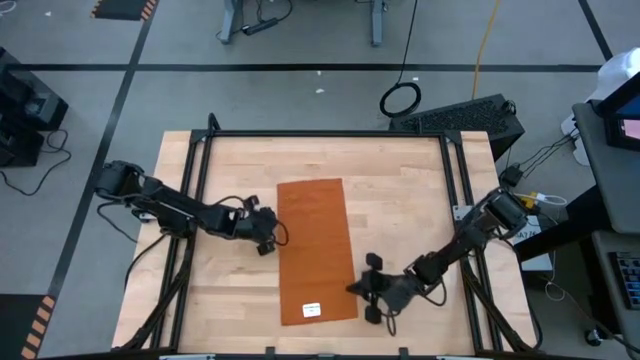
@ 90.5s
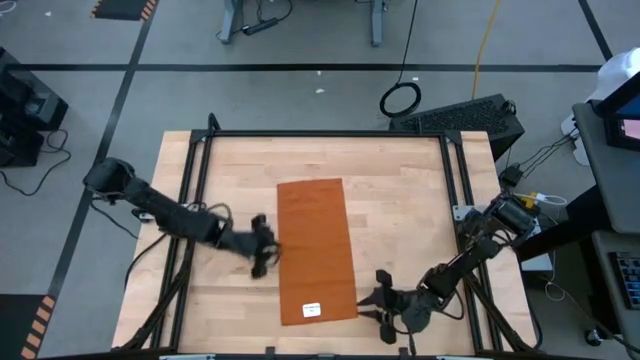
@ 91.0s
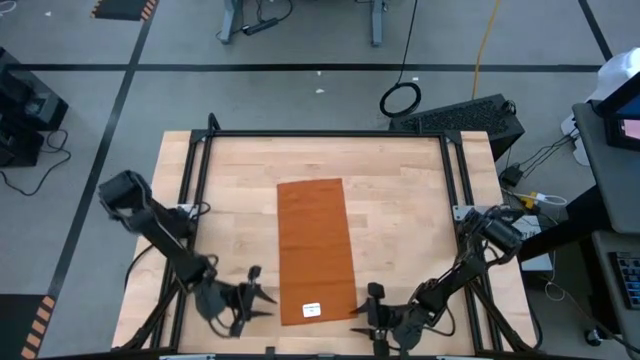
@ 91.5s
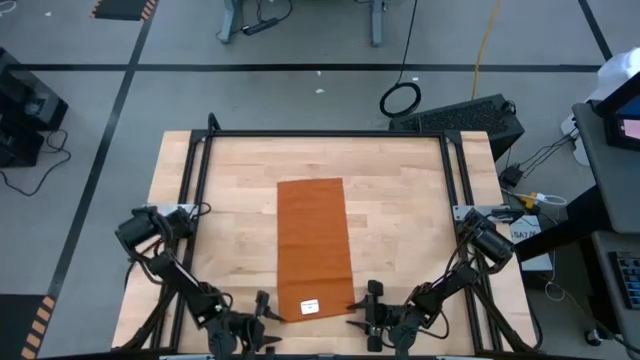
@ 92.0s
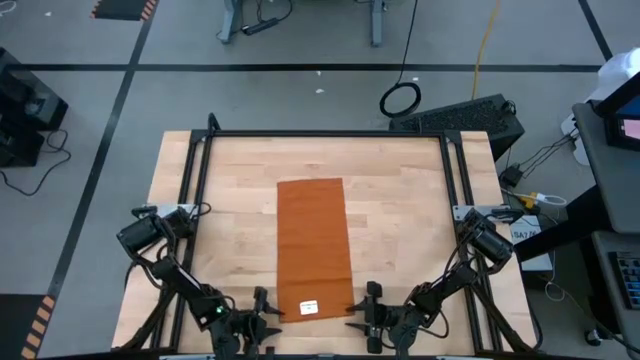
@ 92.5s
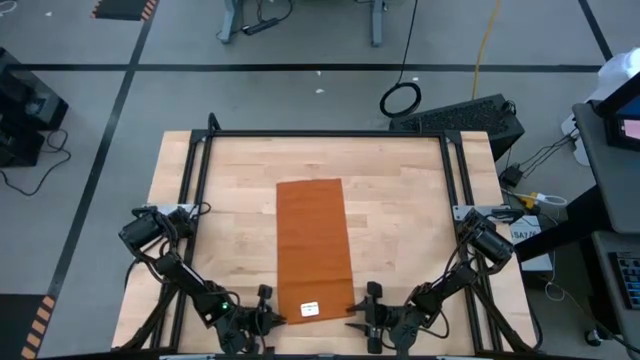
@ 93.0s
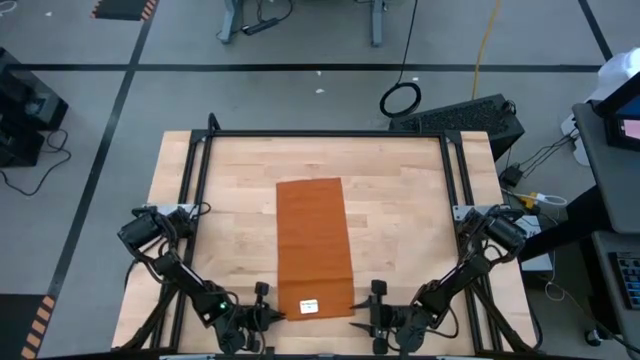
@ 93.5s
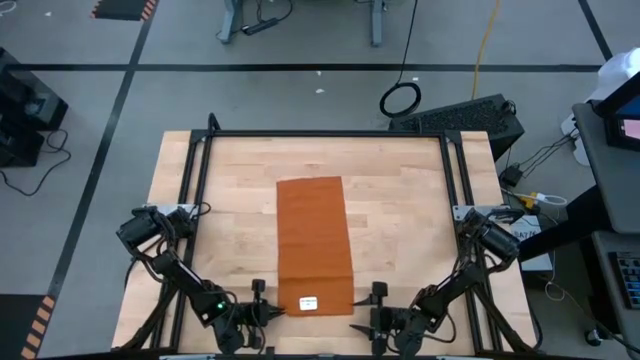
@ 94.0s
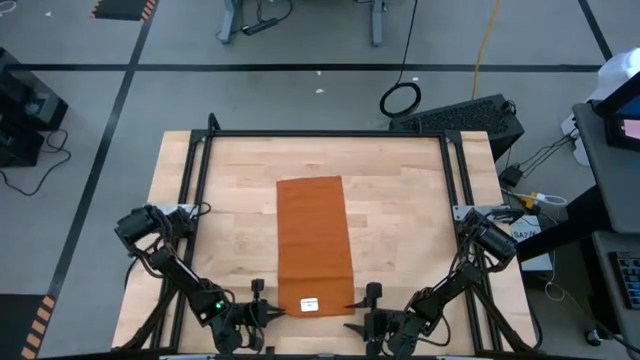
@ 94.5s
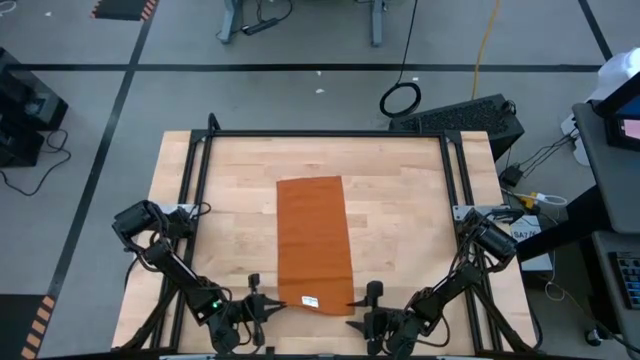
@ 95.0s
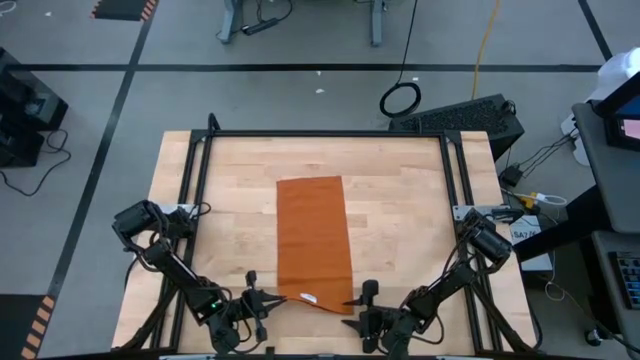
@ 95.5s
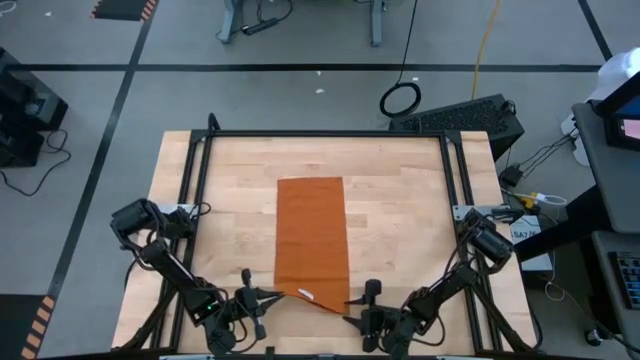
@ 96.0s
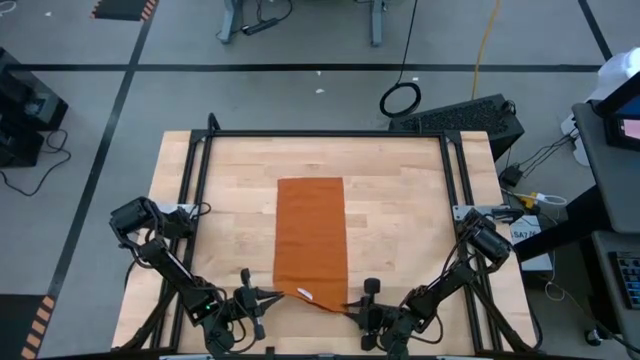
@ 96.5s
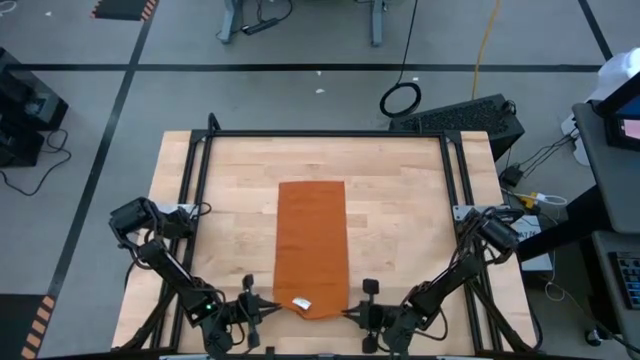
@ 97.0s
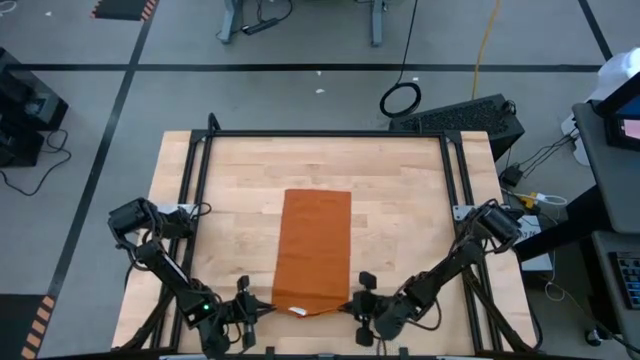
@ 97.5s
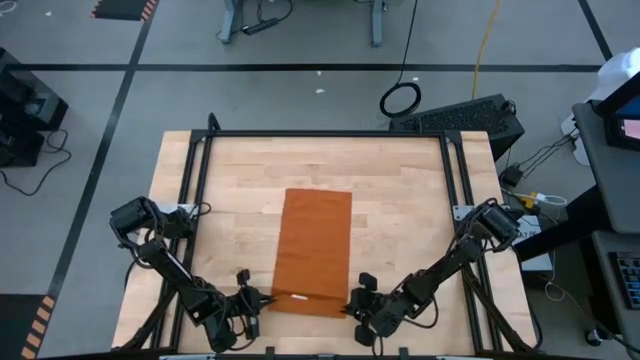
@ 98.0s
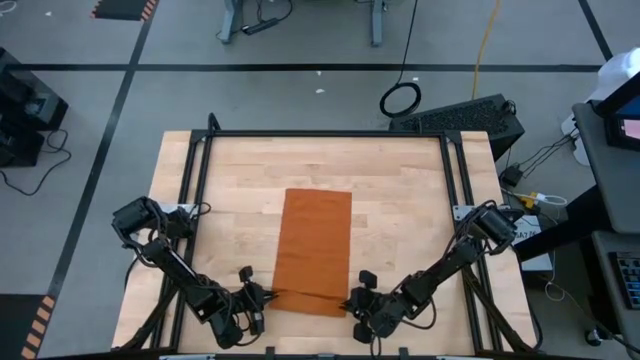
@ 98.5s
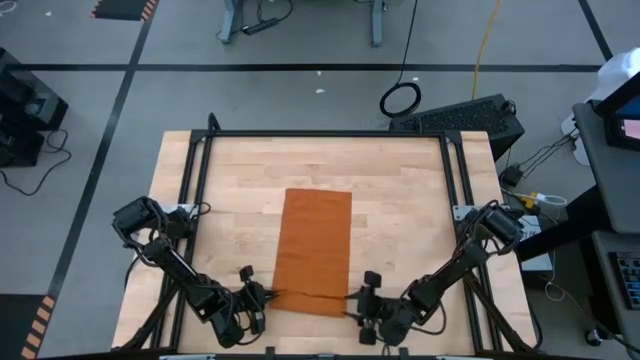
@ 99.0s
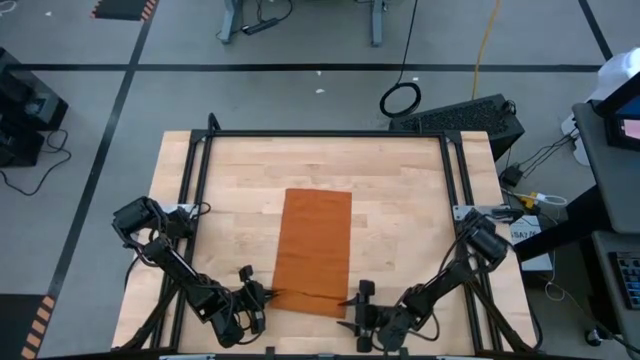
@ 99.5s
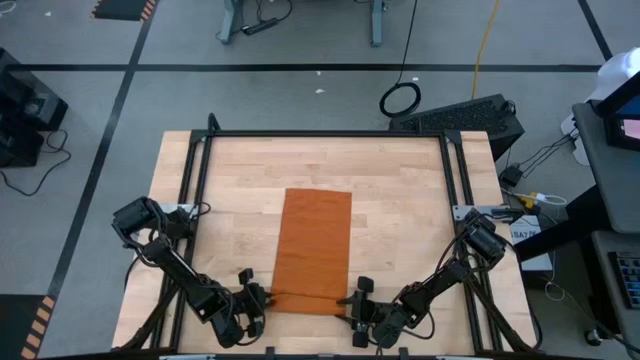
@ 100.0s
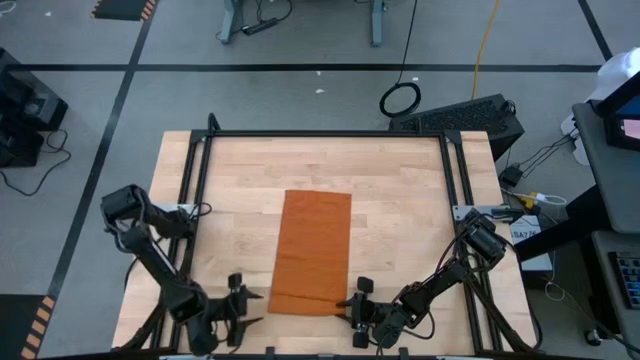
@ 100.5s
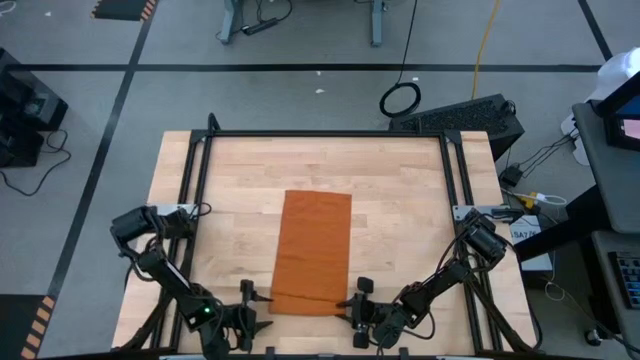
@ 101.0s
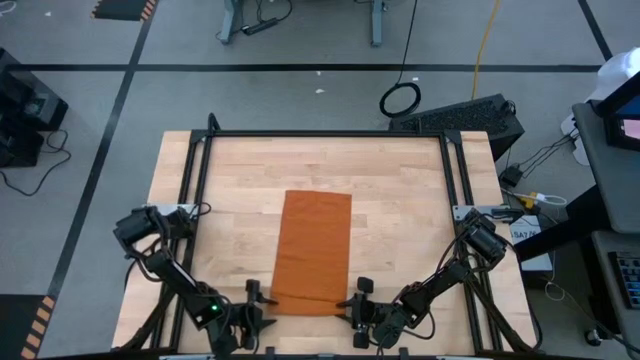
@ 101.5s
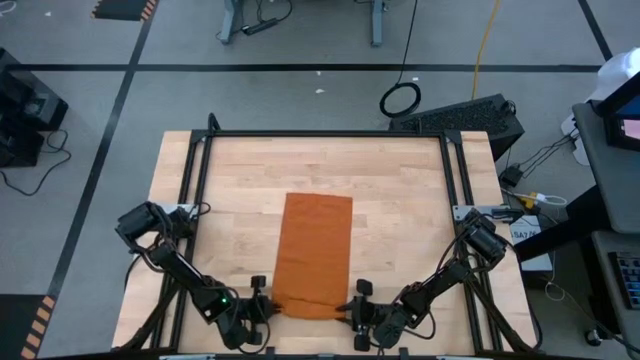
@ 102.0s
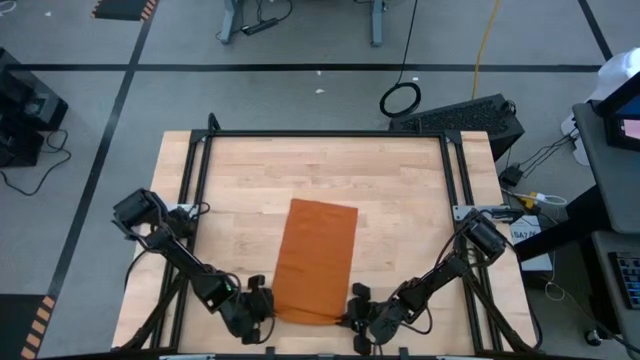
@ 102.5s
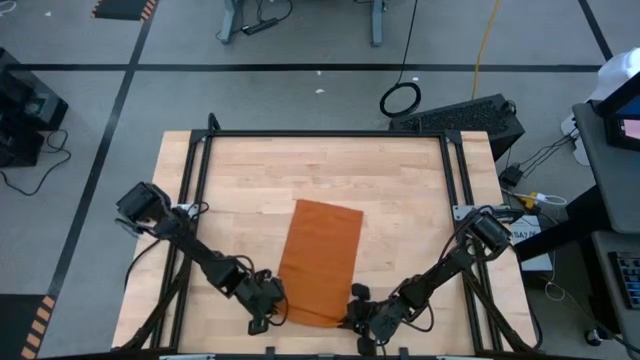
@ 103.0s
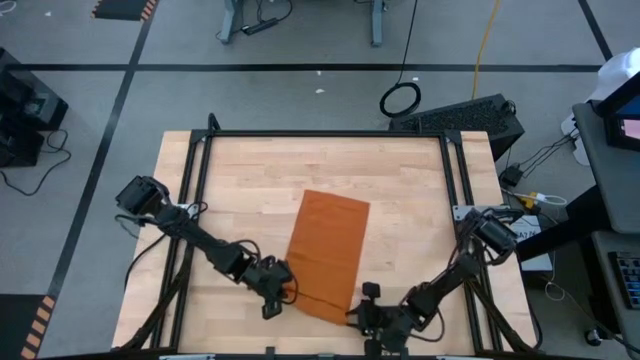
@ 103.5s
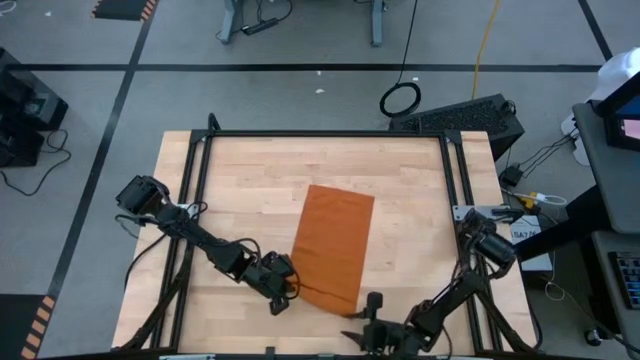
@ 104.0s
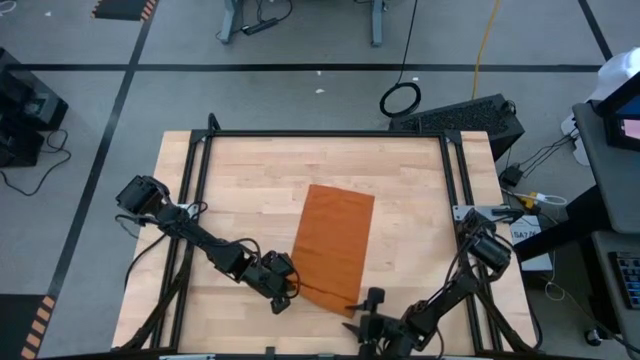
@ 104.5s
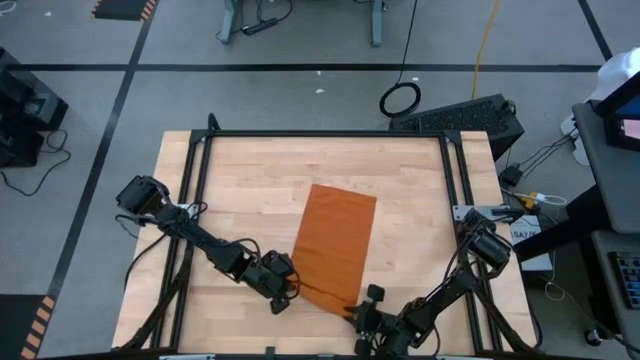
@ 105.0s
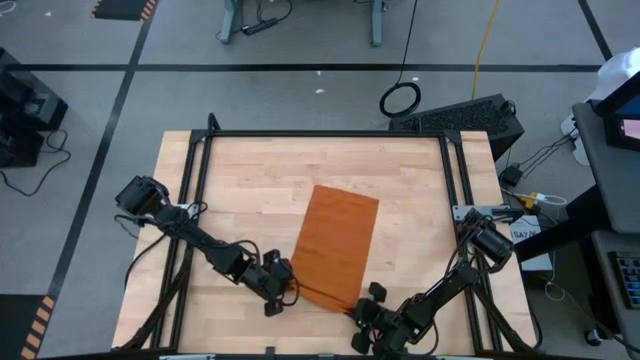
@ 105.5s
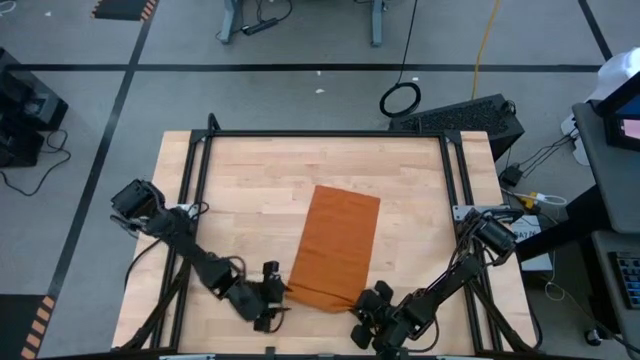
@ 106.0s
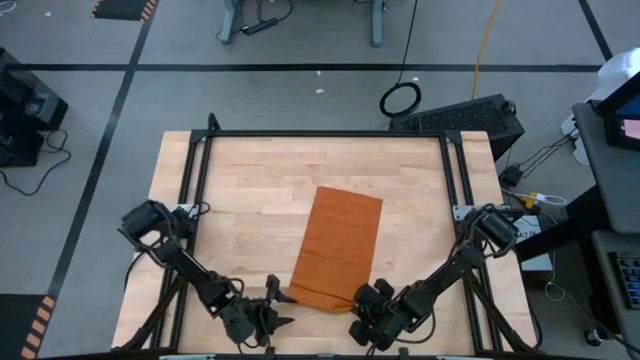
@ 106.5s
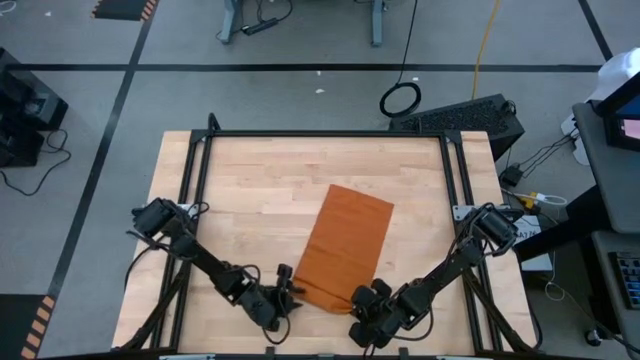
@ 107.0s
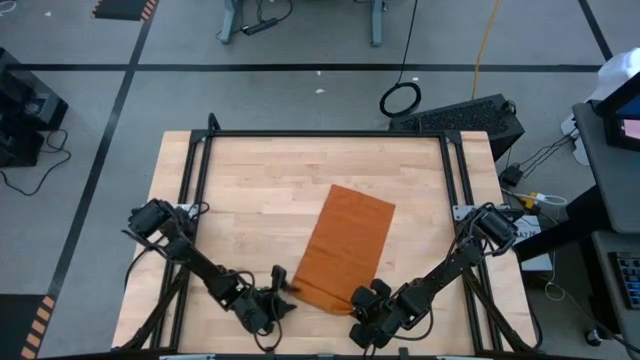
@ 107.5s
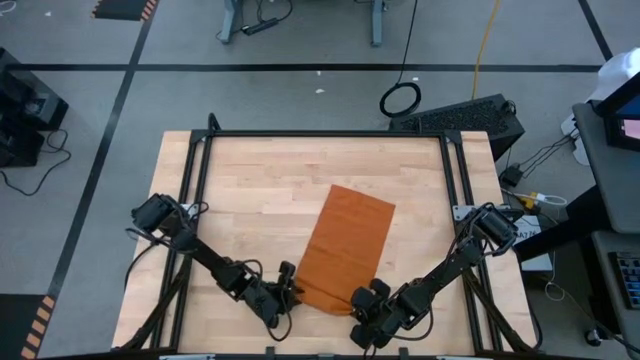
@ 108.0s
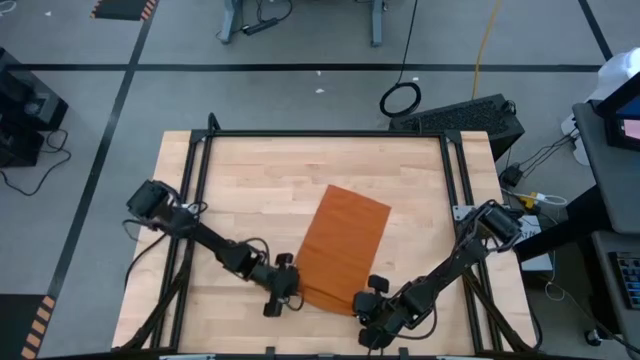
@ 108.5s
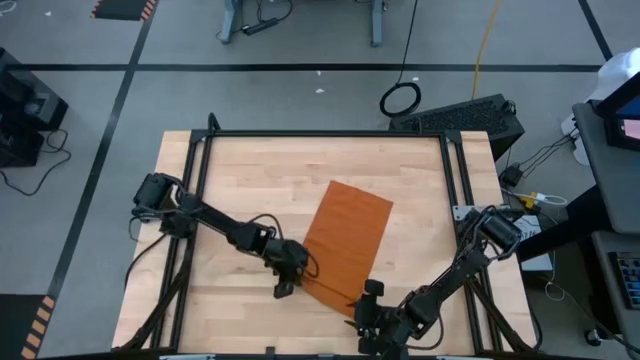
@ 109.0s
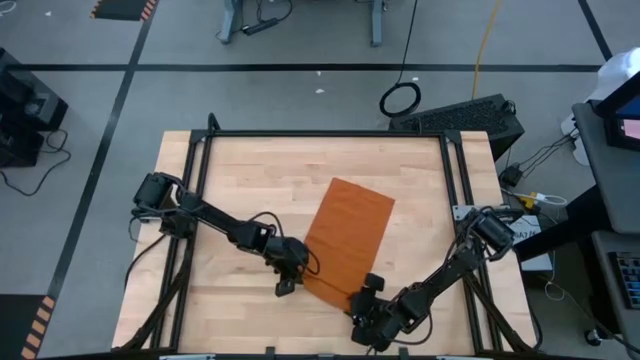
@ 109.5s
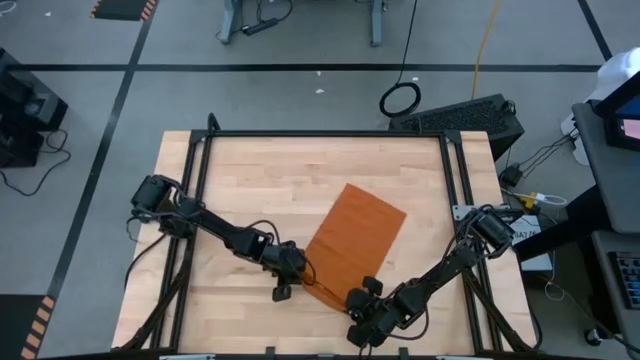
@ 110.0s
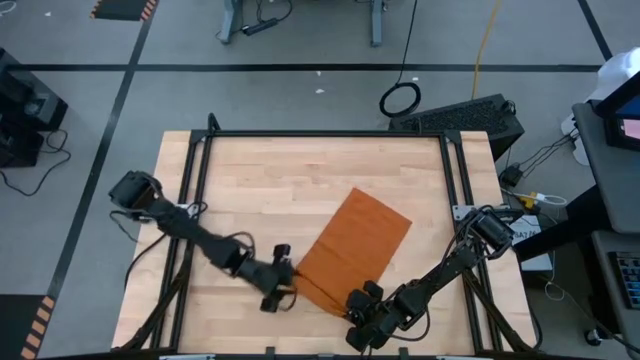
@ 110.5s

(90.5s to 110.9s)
Task: Roll towel into tight, uniform cylinder
Roll the brown towel

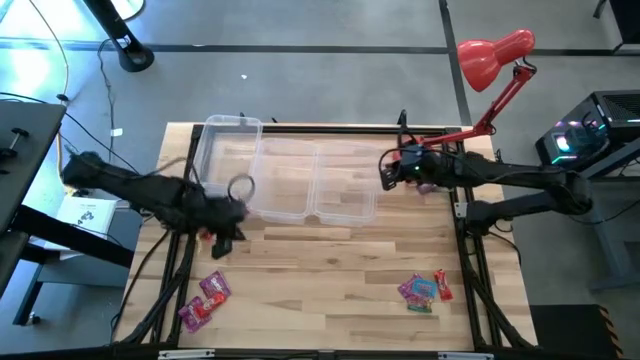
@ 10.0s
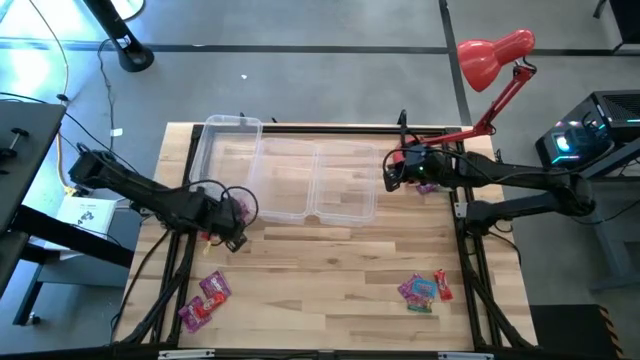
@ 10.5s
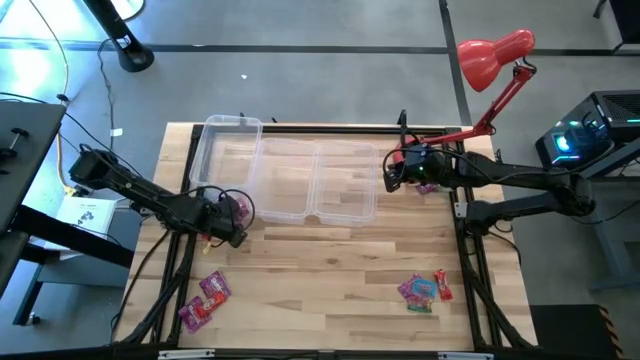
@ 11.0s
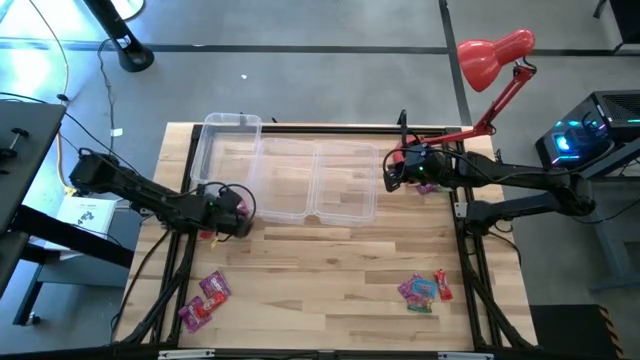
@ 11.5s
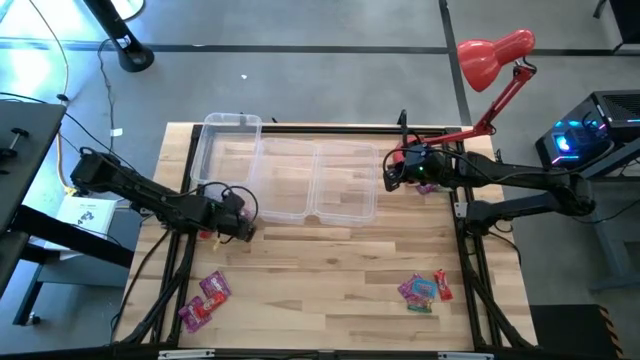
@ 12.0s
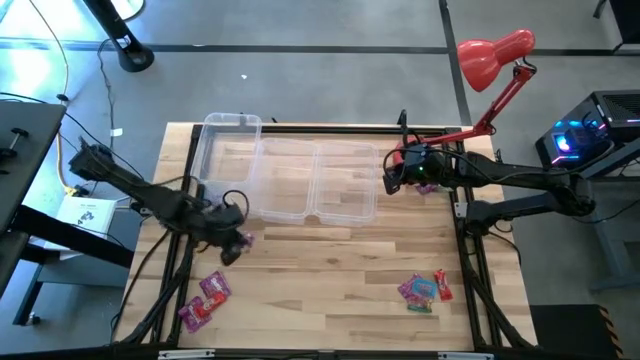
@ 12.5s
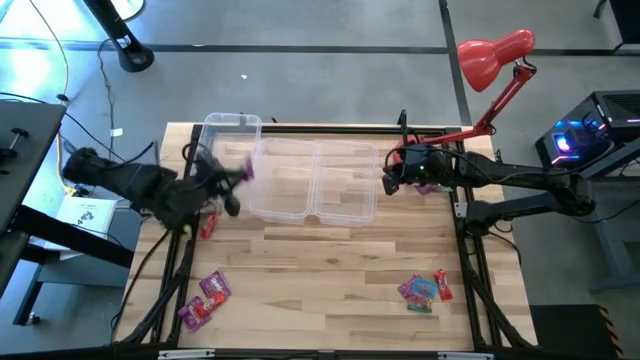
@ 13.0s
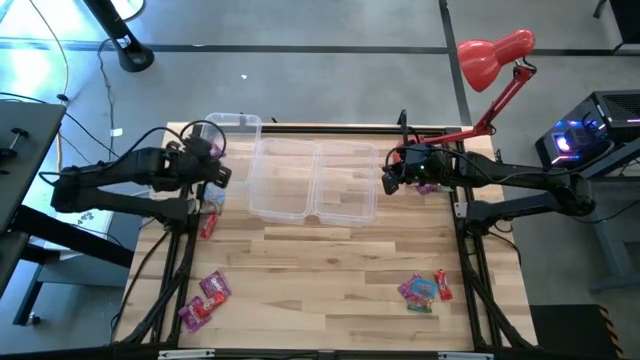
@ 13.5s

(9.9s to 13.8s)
Task: Sort candy
Put the violet candy bag into the left transparent bin
